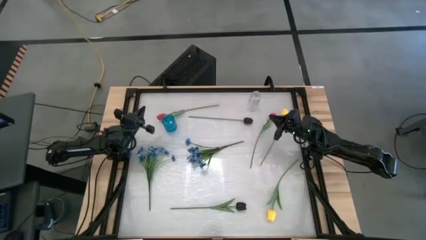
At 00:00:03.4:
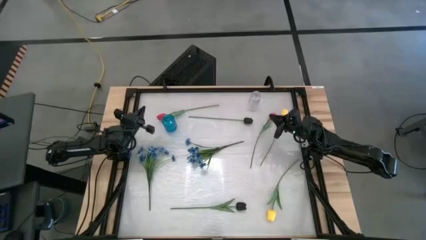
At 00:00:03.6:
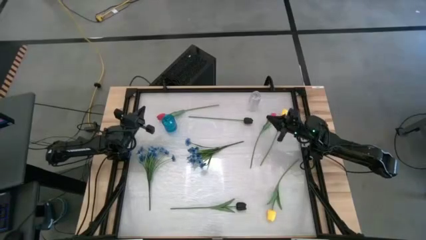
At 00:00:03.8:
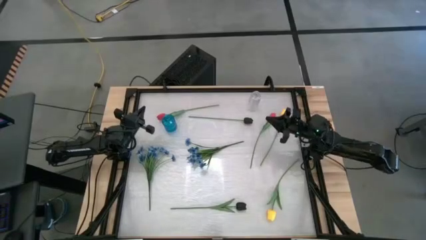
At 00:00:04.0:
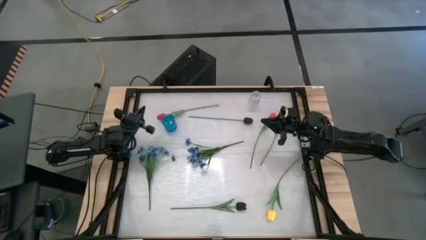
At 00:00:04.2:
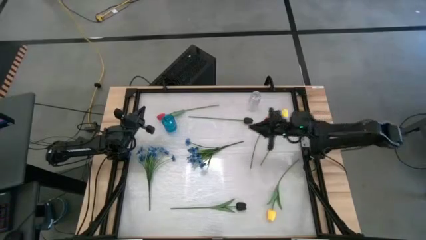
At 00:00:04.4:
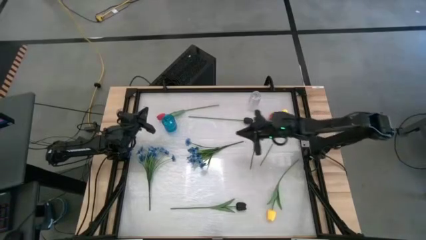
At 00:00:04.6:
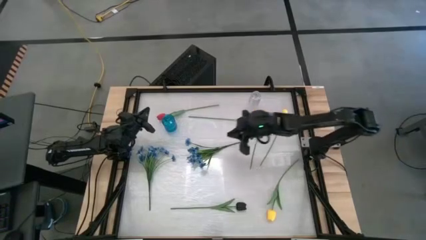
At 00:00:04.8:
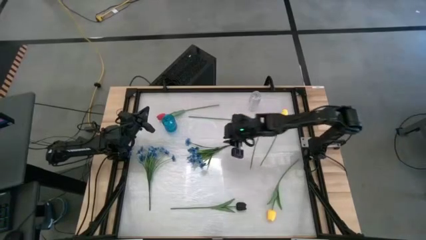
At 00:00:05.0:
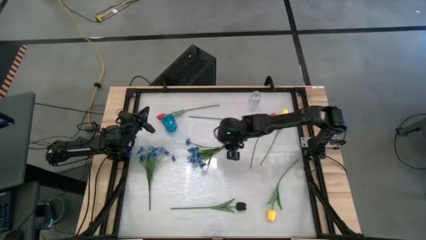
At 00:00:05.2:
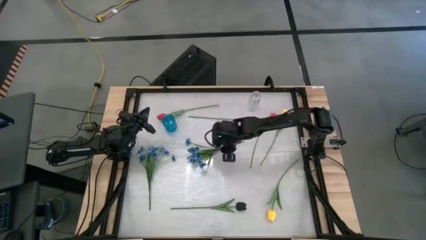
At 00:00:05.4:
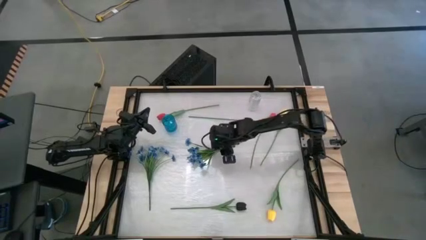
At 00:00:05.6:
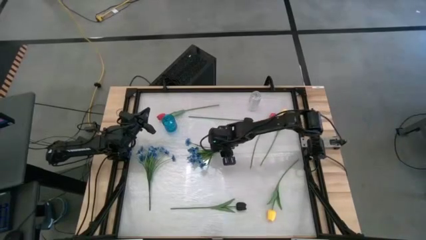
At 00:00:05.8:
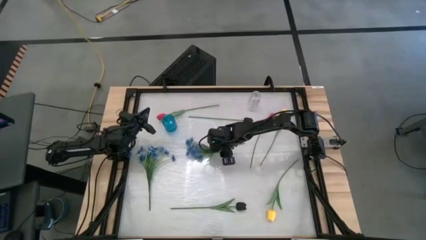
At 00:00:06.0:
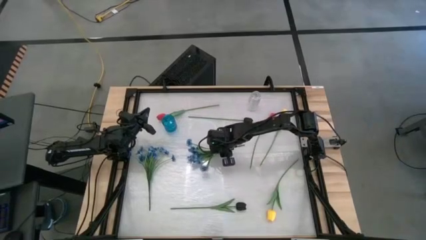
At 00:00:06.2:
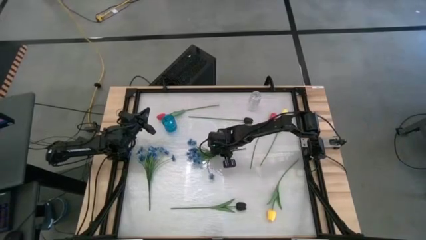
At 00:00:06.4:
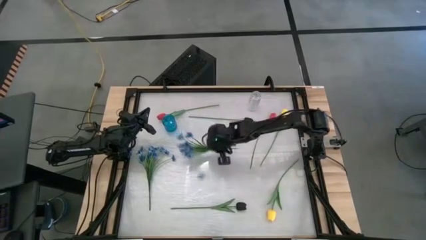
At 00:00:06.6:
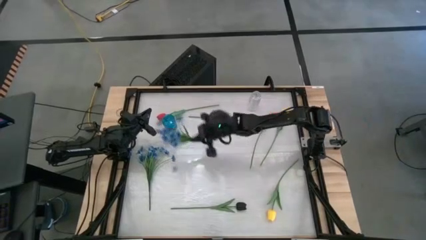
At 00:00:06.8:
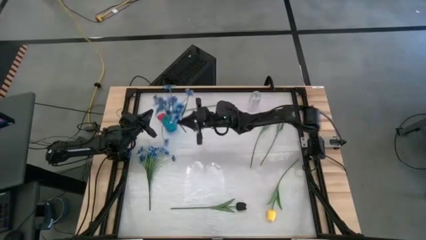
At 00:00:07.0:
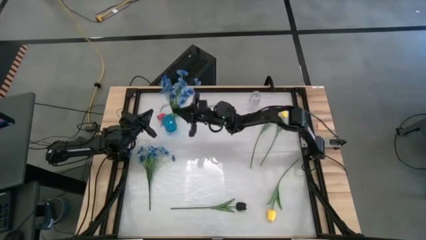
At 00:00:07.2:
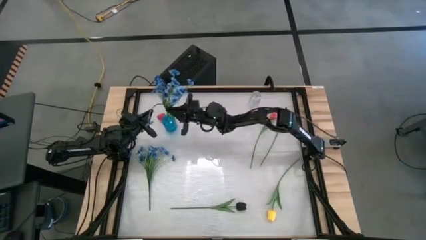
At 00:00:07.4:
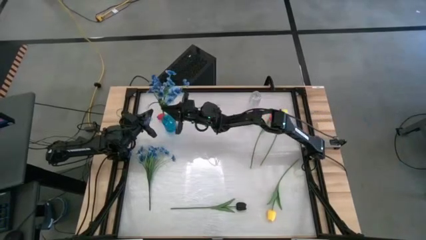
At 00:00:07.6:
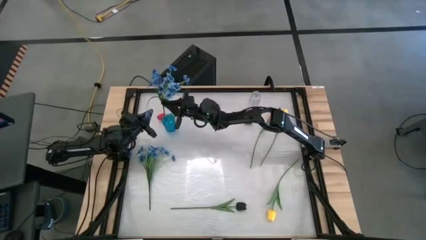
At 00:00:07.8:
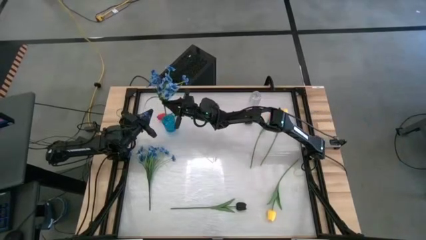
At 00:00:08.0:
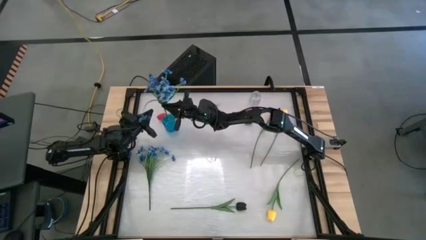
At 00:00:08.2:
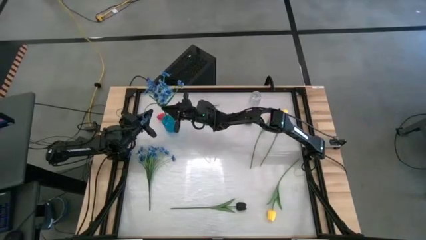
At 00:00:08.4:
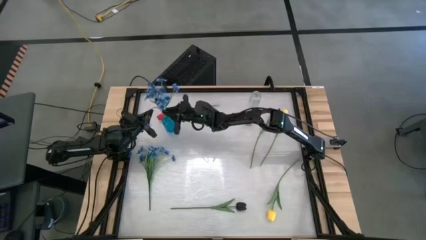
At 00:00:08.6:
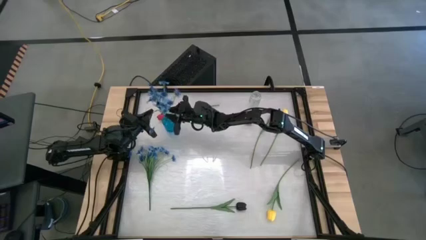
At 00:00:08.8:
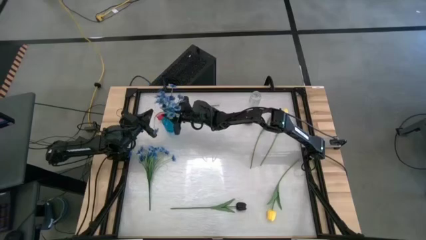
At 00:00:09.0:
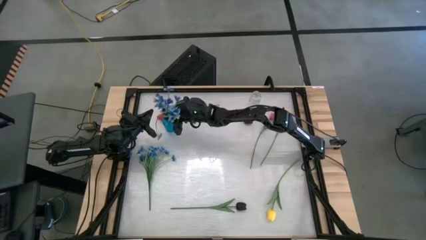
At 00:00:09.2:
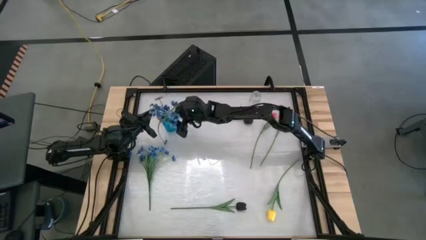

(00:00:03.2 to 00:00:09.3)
Task: Sort flowers into vase by color
Put the right blue flowers into the blue vase

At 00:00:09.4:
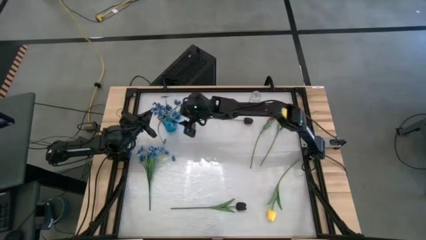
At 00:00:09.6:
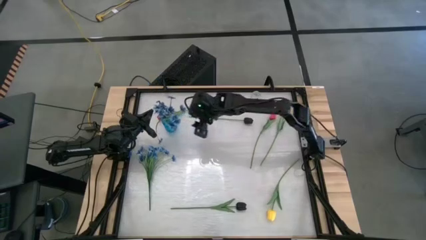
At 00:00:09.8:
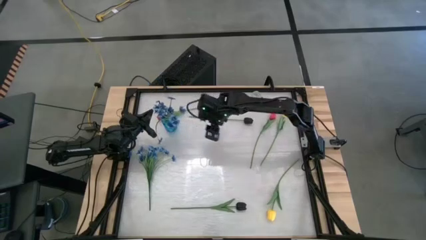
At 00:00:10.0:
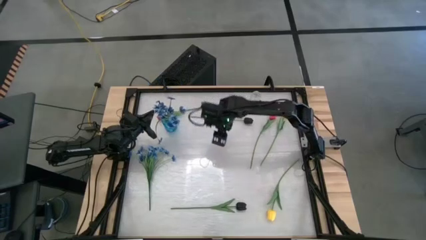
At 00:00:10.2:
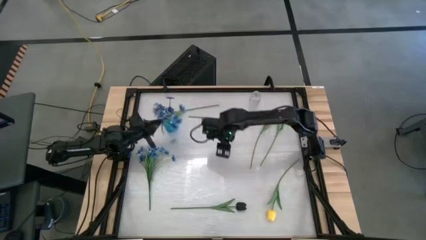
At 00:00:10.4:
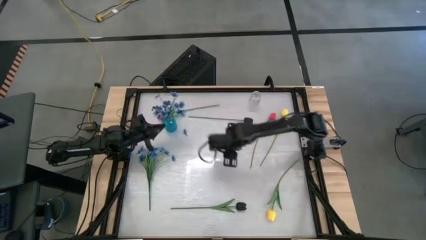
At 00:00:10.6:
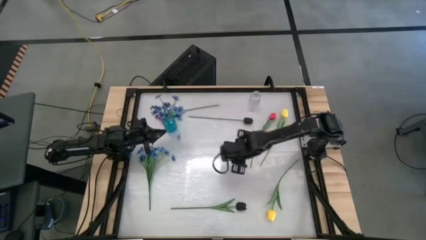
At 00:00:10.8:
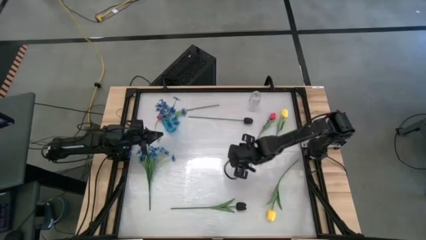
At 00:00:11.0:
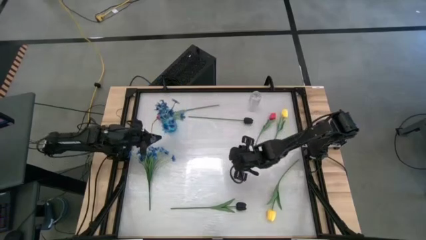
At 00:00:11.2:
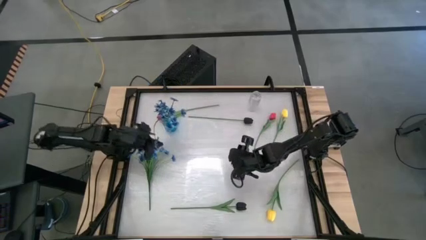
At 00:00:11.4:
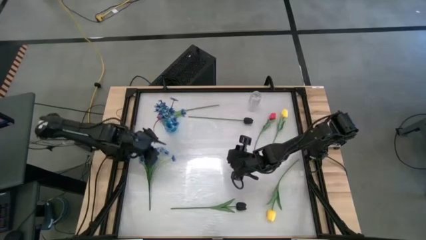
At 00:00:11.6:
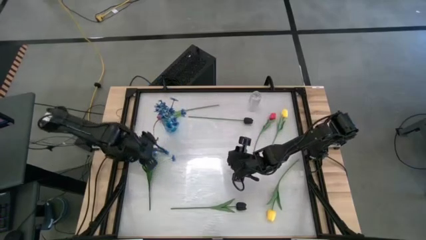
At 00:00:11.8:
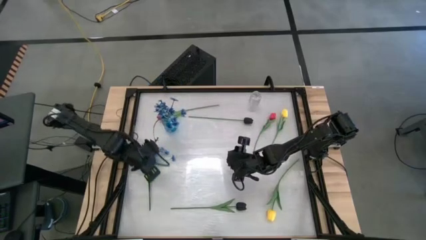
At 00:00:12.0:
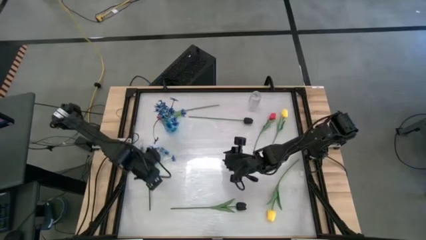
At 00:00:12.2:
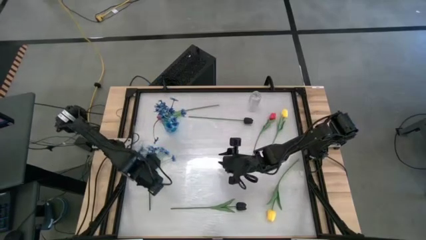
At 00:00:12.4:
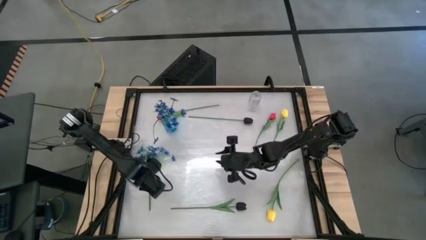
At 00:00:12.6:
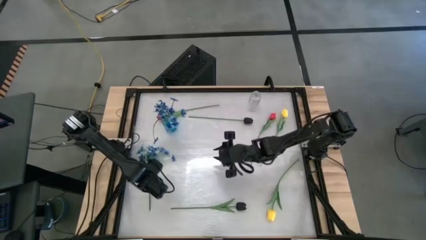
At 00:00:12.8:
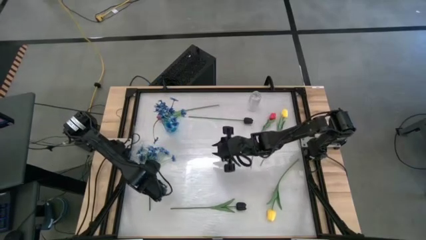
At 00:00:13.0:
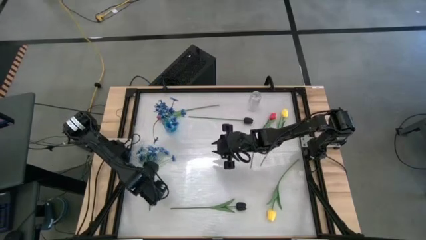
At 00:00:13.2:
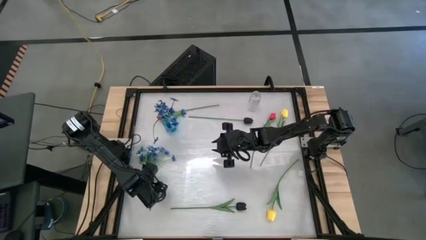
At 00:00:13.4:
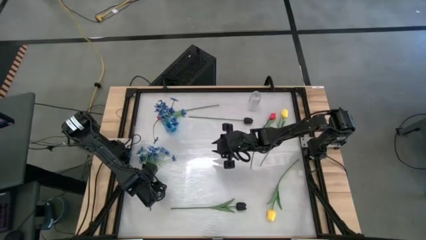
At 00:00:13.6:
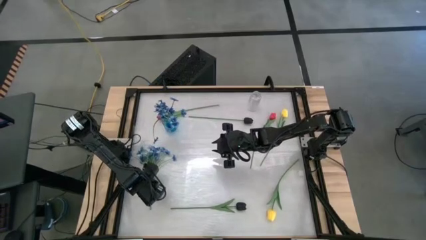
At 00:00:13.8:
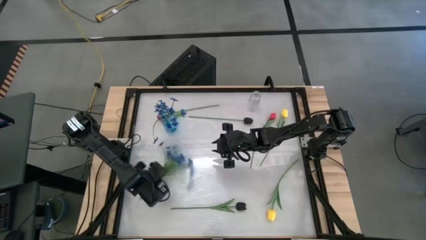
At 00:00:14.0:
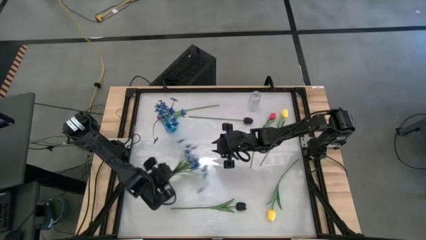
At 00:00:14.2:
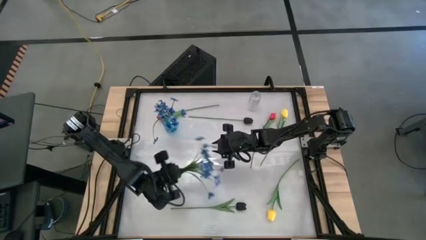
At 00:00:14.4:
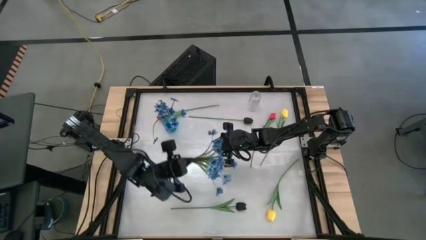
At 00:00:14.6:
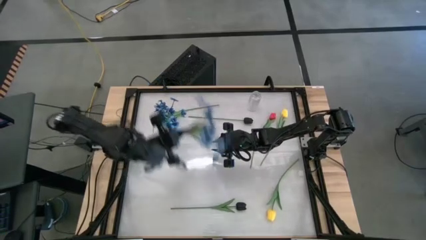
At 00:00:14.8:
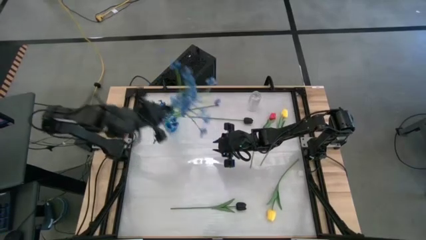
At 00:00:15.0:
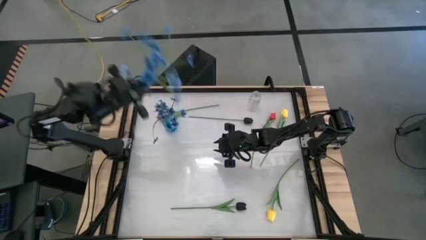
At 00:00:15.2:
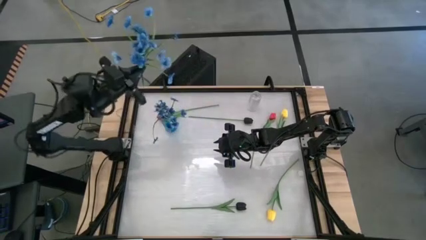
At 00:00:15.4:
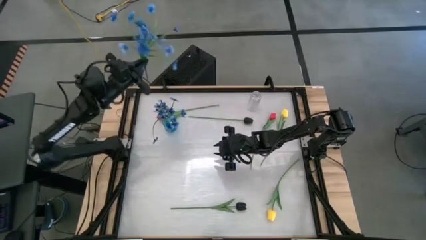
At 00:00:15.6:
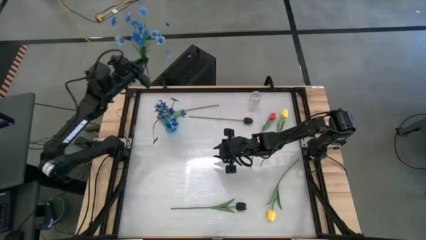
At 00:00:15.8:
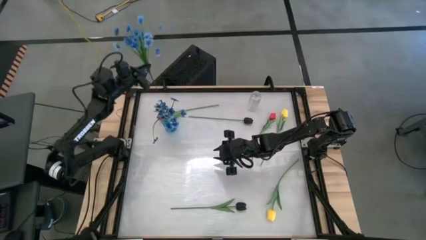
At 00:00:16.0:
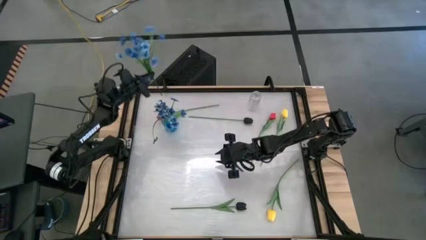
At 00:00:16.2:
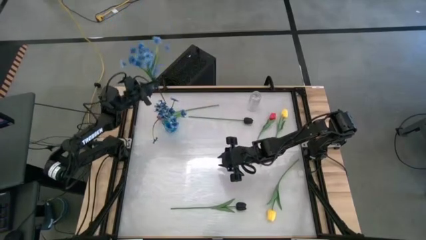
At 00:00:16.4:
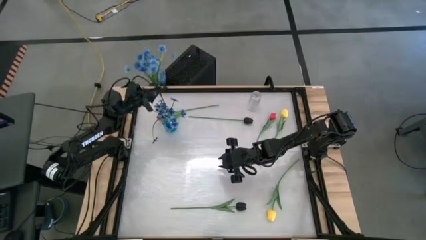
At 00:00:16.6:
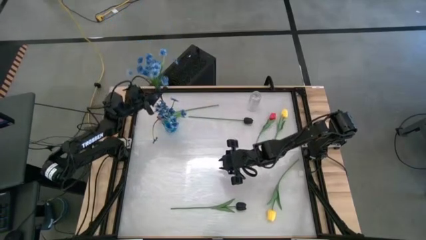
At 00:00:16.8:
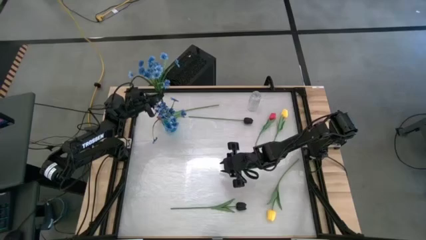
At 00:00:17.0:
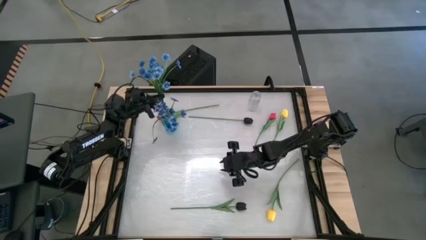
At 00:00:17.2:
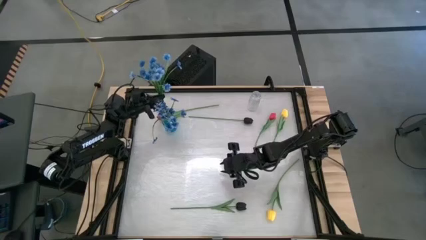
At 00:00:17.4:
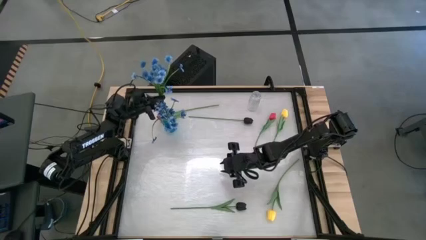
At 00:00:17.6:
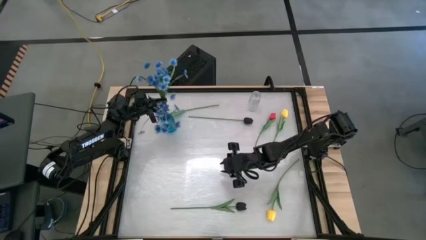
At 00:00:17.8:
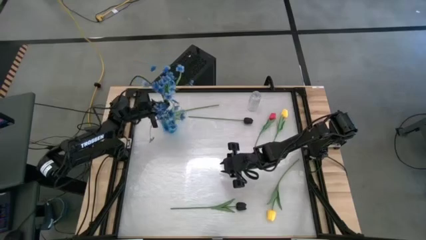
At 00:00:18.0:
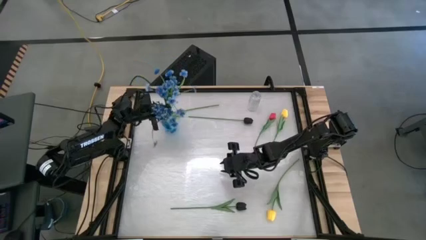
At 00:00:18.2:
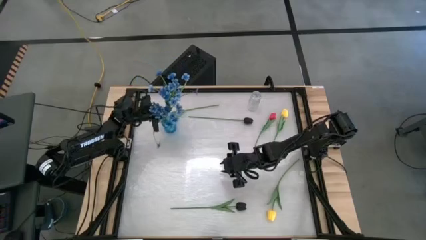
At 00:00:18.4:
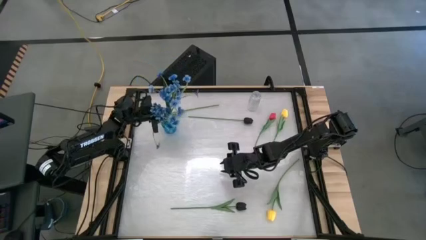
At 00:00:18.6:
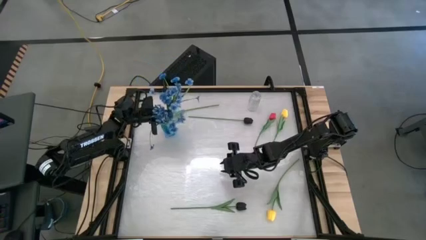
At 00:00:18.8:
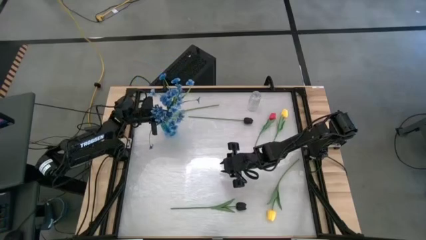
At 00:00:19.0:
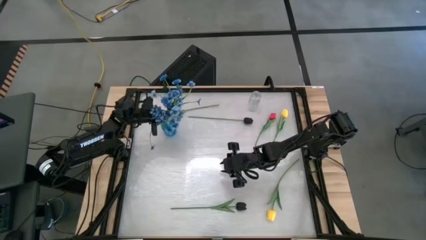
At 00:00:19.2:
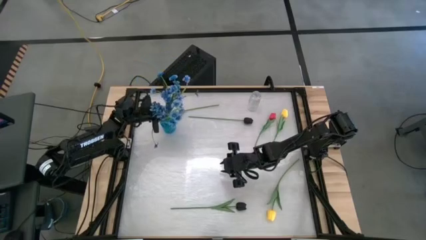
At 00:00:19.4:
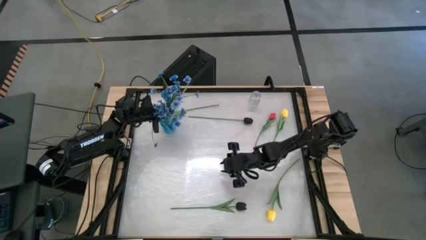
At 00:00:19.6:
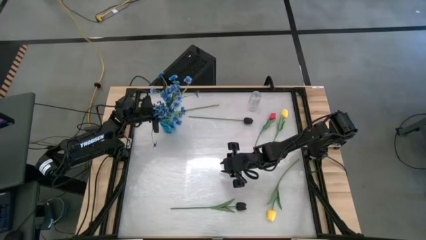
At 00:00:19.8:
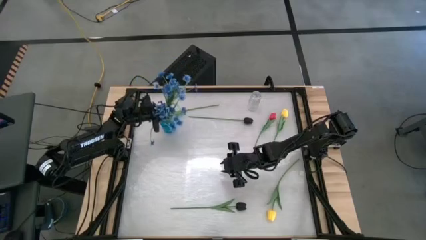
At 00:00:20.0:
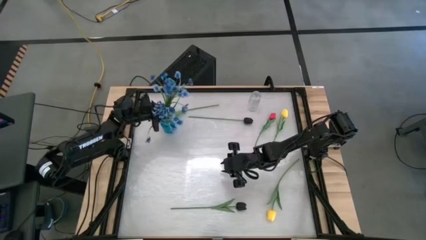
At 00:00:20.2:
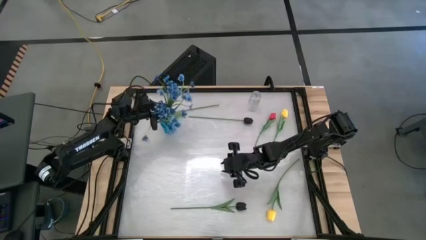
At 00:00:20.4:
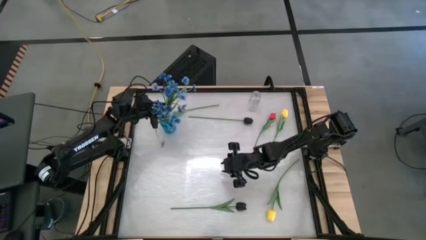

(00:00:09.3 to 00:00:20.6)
Put the blue flowers into the blue vase
